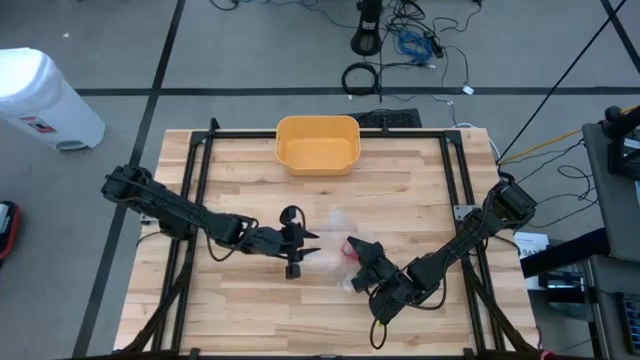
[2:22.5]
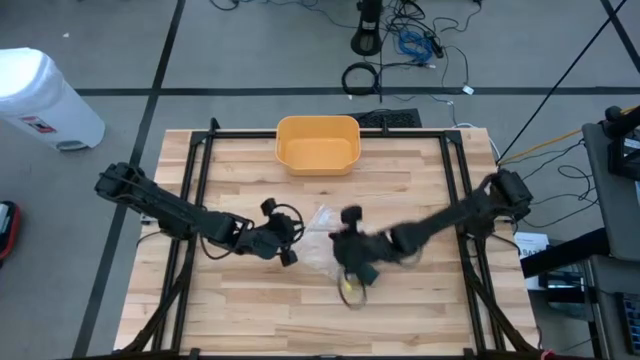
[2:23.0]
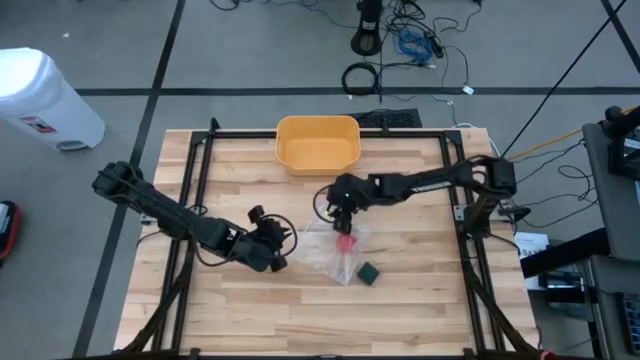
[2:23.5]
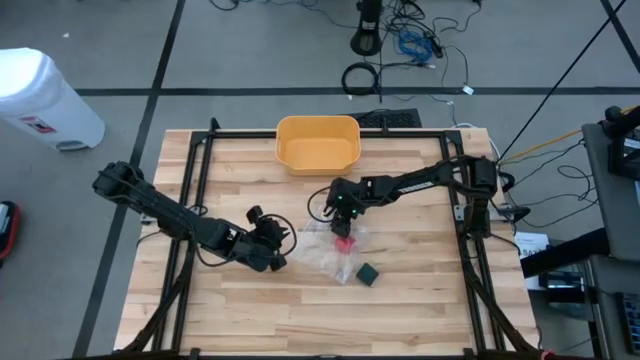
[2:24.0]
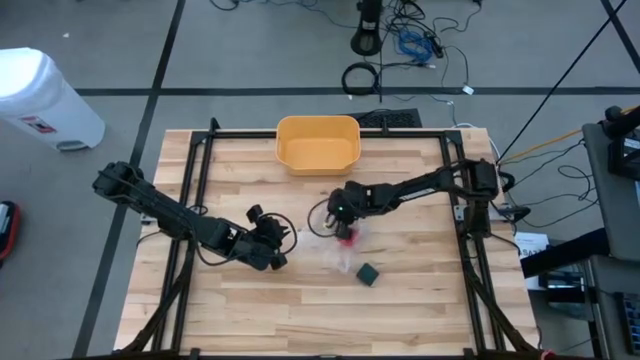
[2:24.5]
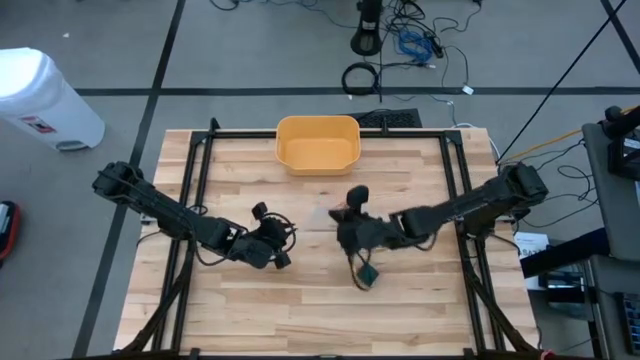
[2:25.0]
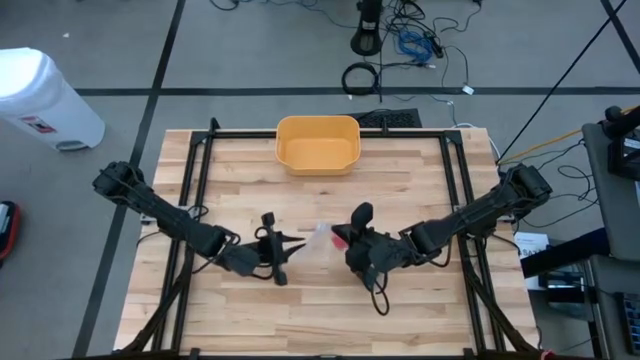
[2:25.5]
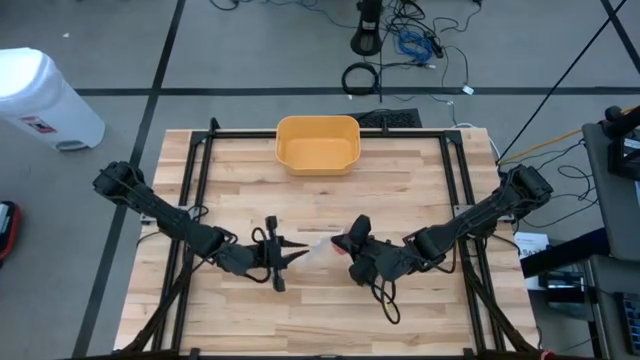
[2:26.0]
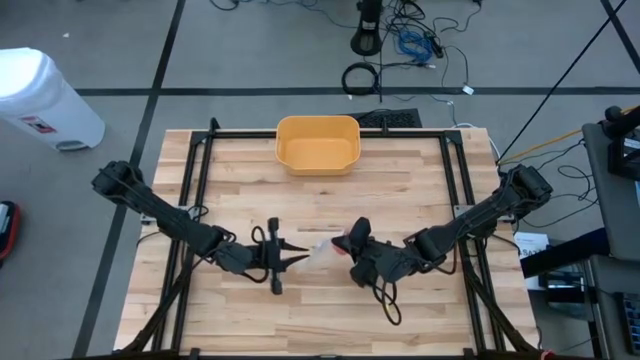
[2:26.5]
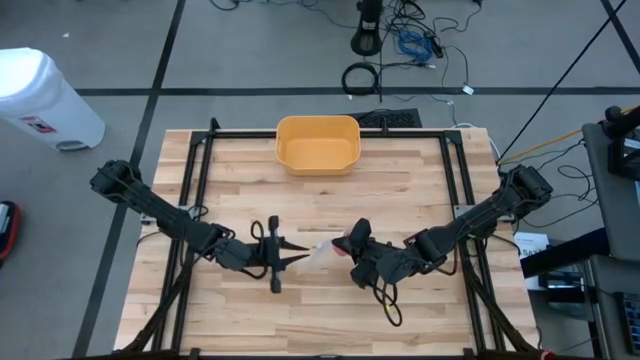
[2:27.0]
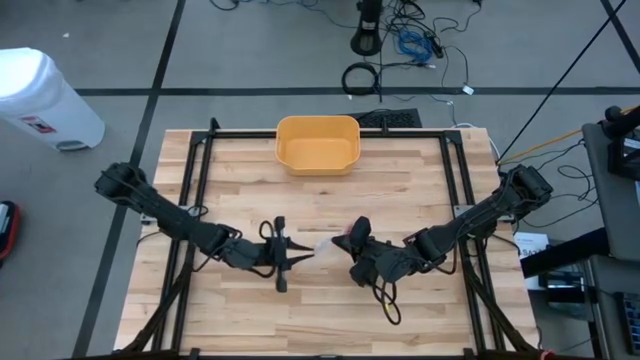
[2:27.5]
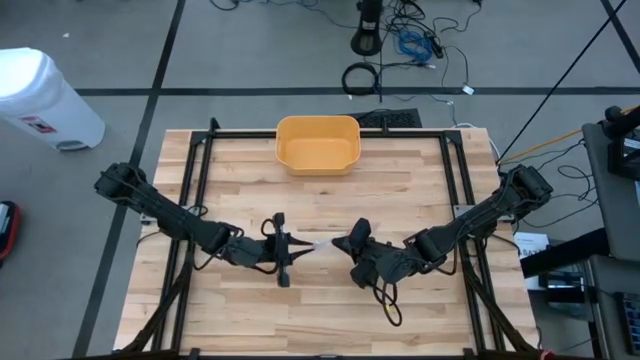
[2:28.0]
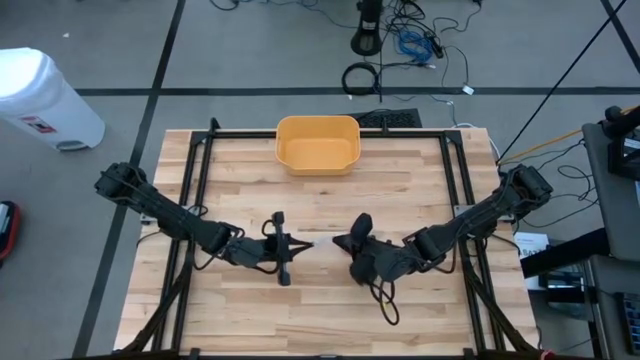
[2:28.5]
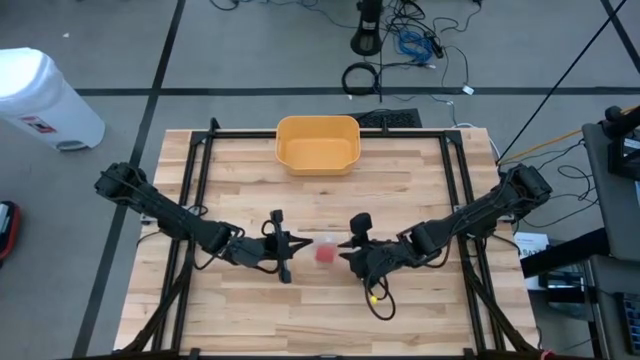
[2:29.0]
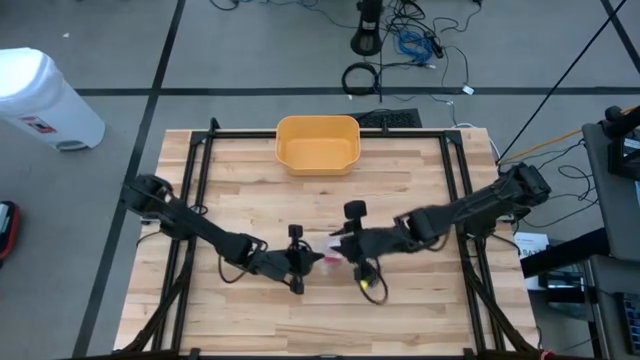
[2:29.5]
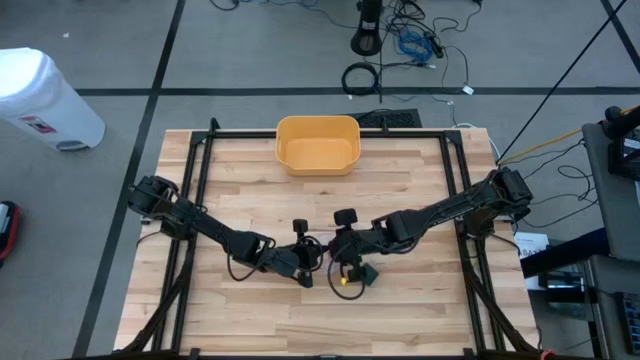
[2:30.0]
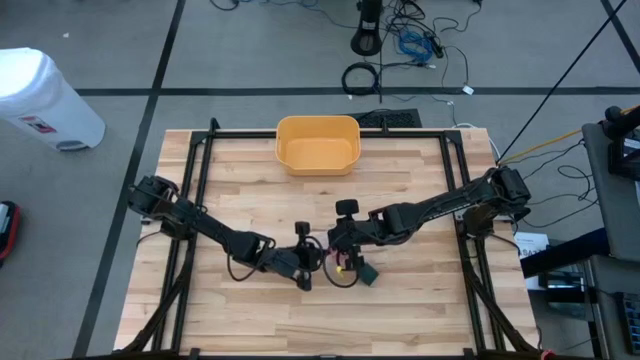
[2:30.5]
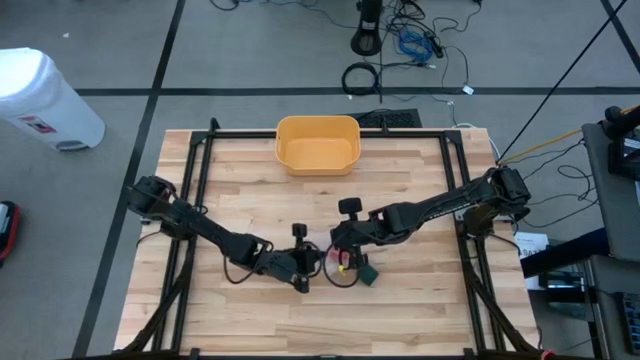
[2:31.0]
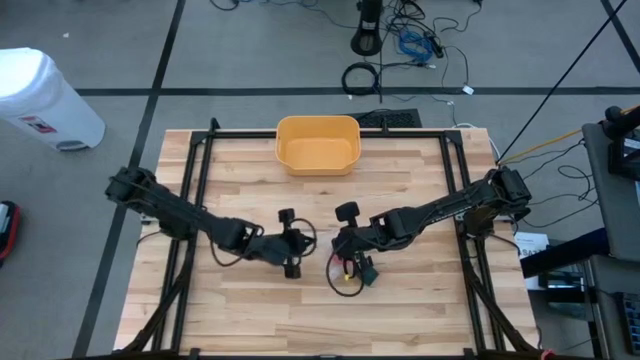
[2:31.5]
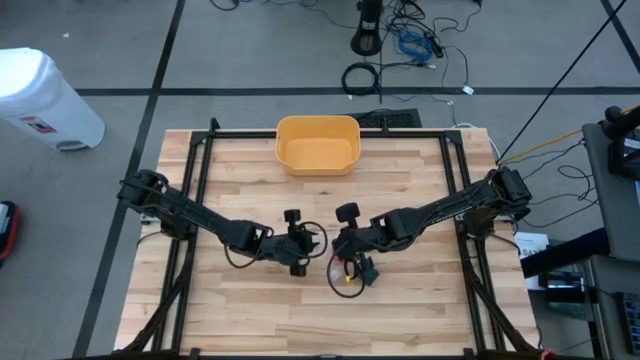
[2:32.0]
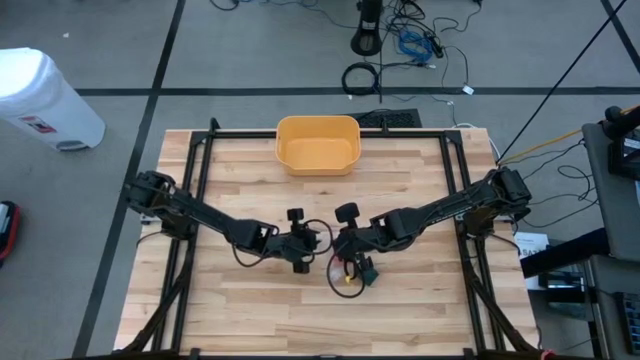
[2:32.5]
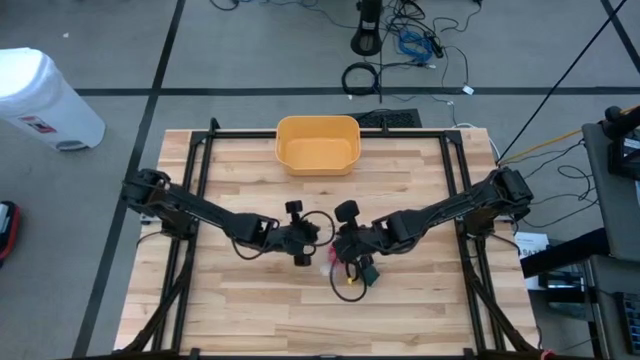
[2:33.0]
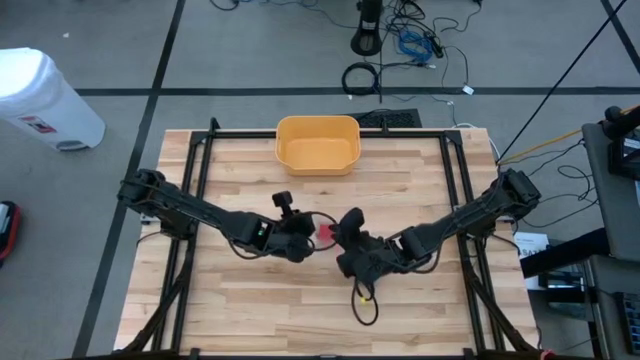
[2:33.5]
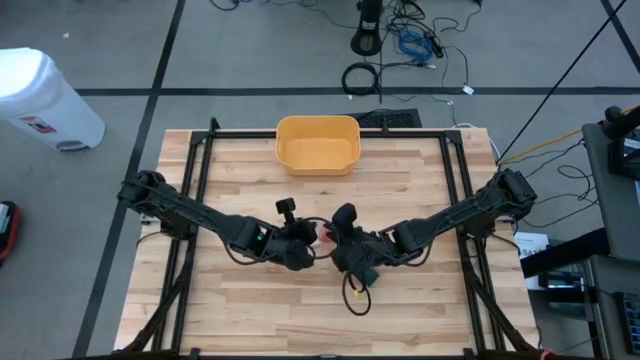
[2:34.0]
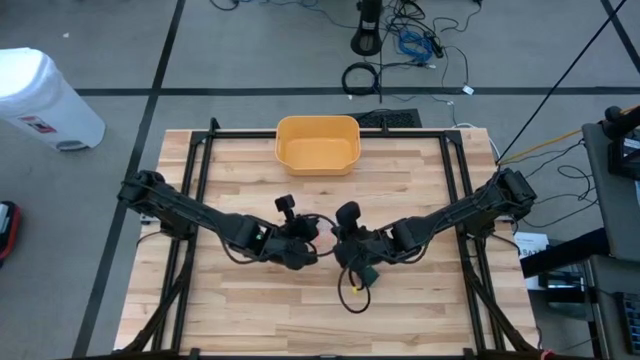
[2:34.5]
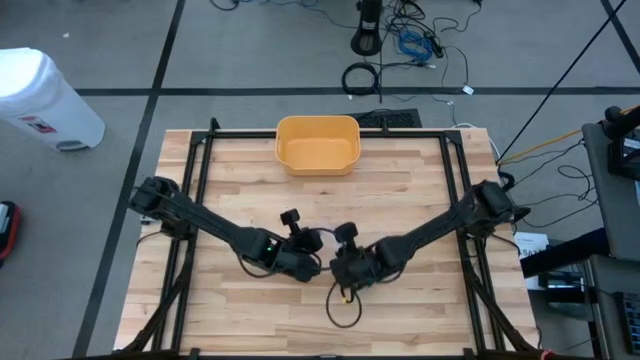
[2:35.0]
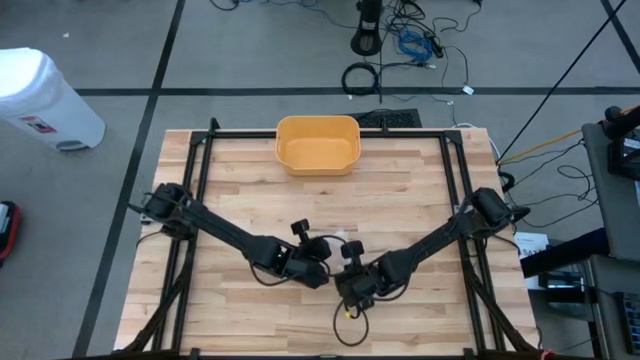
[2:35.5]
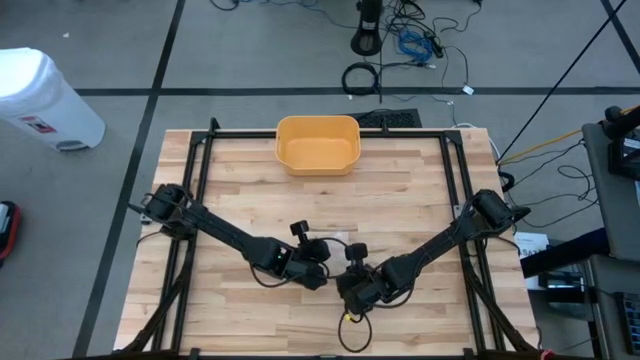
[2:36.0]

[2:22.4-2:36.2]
Task: Roll bandage
Open the transparent zip bag containing the rolled red bandage

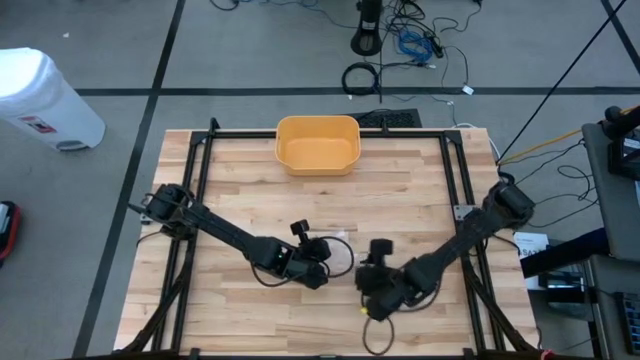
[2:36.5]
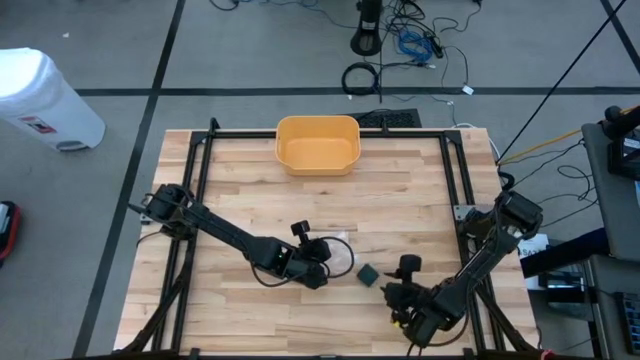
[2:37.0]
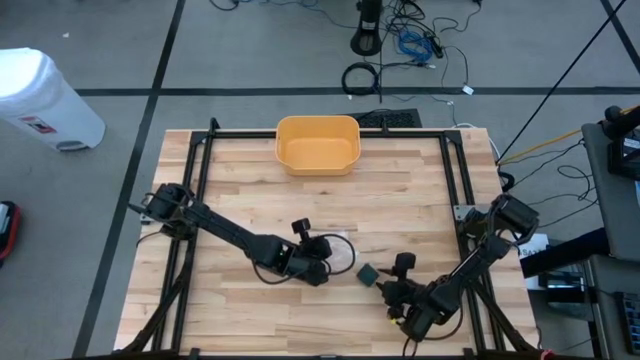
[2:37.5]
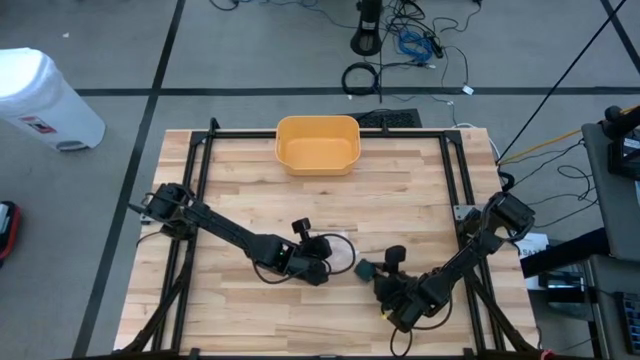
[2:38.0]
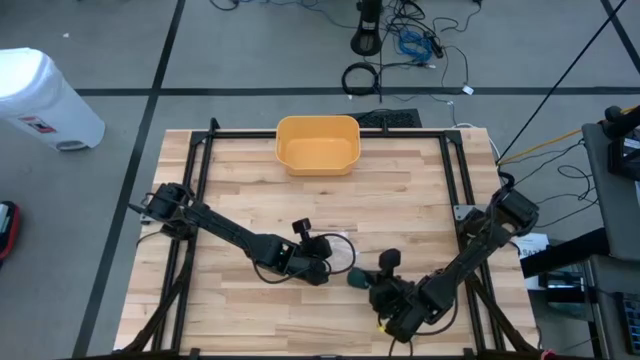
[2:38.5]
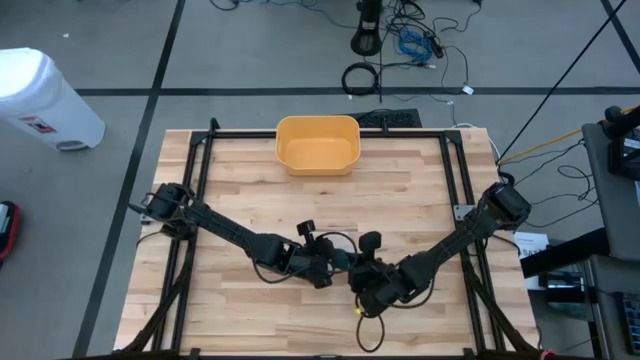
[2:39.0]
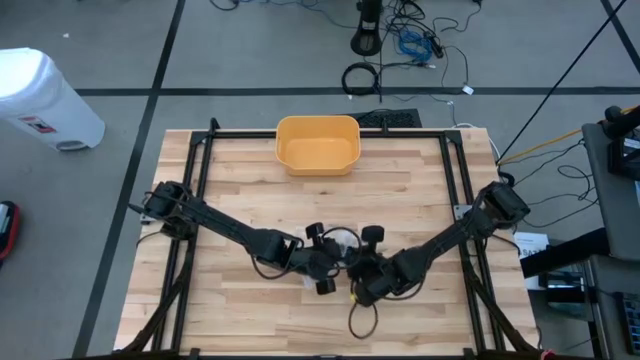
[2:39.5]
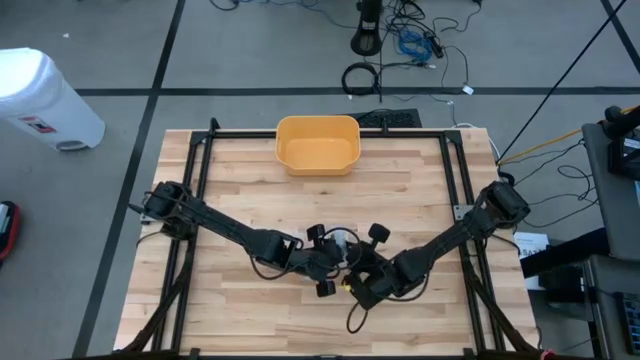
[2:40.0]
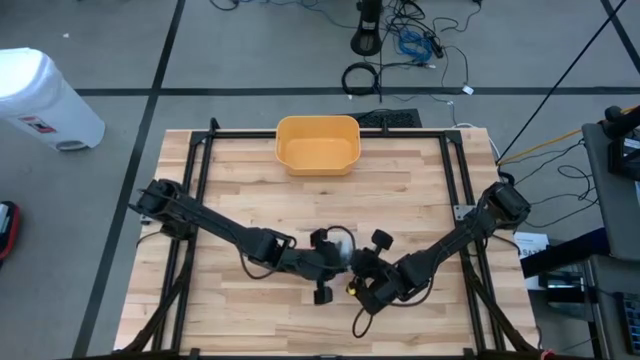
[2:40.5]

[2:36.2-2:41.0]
Put the rolled green bandage into the transparent zip bag

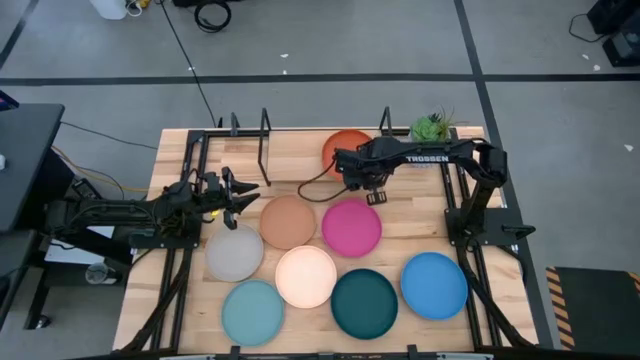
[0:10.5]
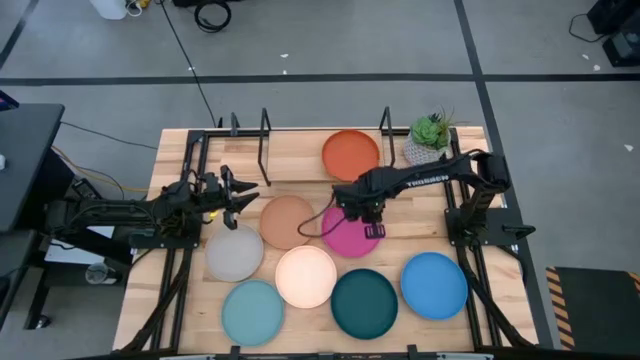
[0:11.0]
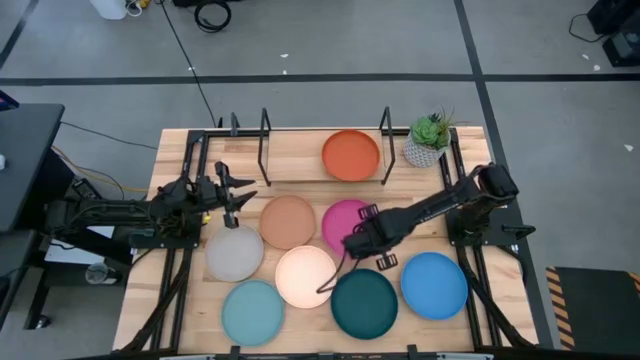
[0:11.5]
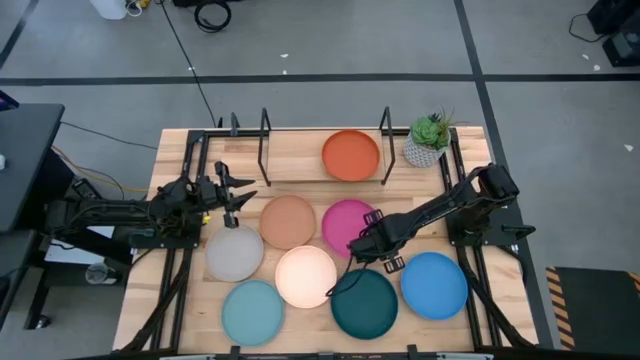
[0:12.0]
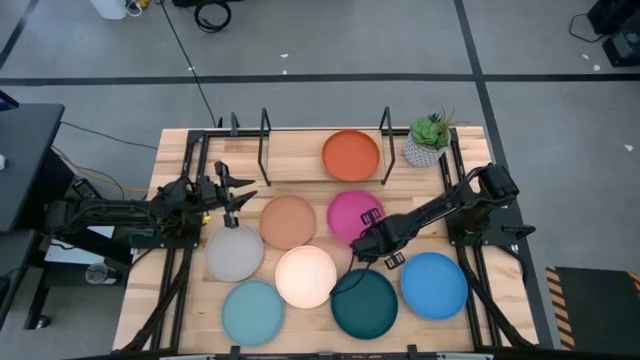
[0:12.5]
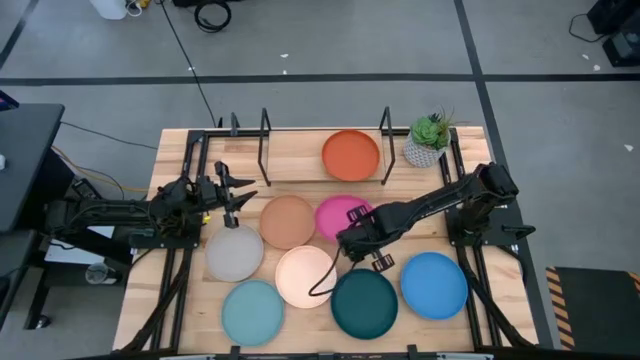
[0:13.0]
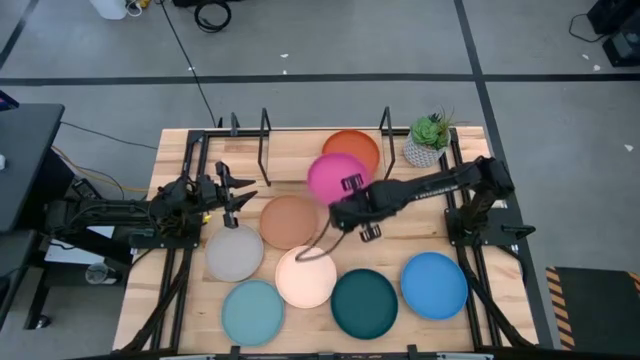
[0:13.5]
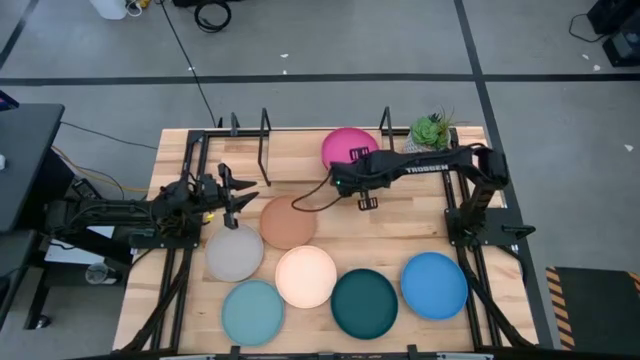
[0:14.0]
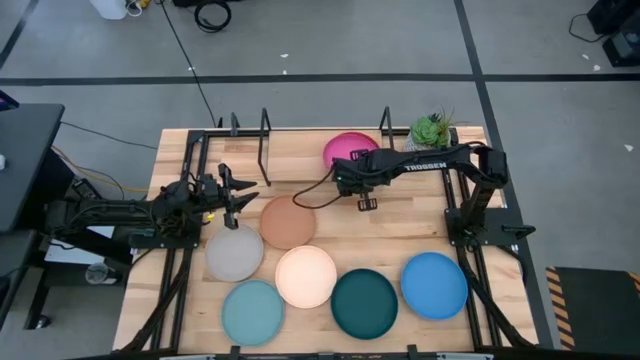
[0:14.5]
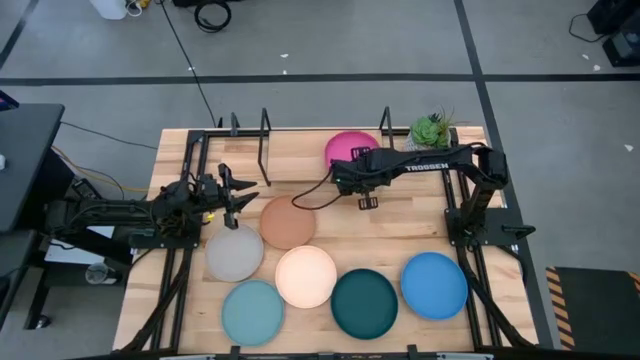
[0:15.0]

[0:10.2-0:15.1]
Task: Place and stack plates onto a shelf
Stack the pink plate on top of the orange plate on the shelf
